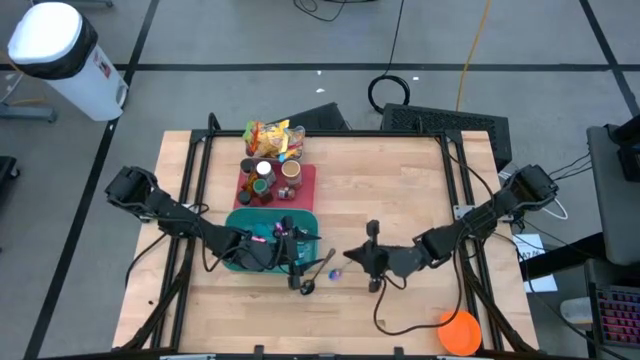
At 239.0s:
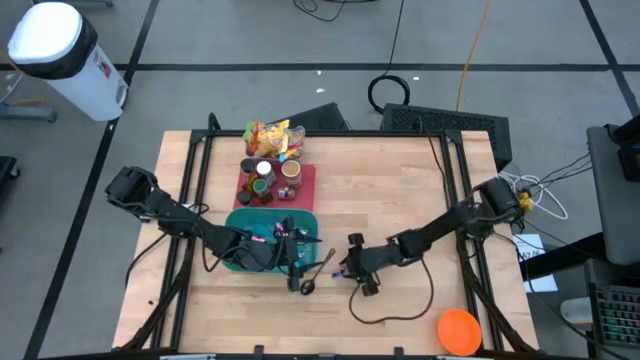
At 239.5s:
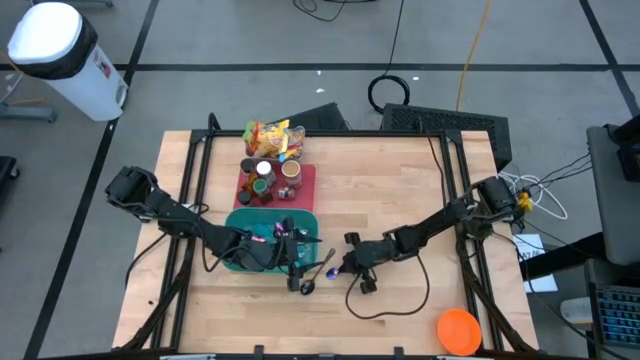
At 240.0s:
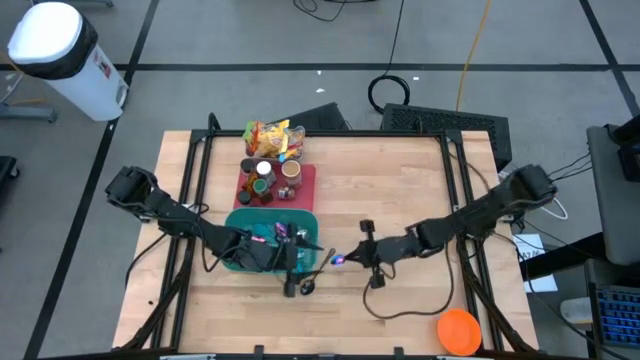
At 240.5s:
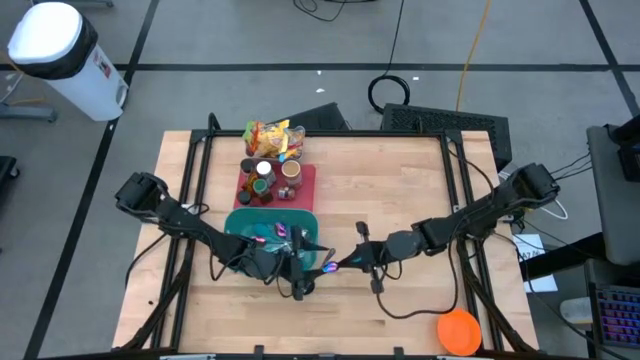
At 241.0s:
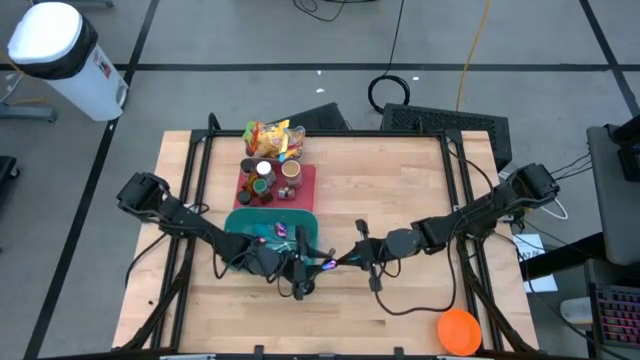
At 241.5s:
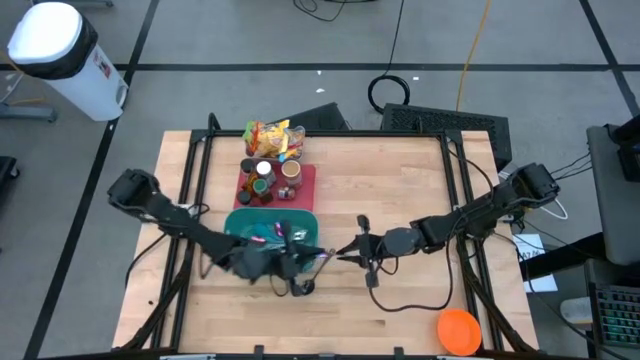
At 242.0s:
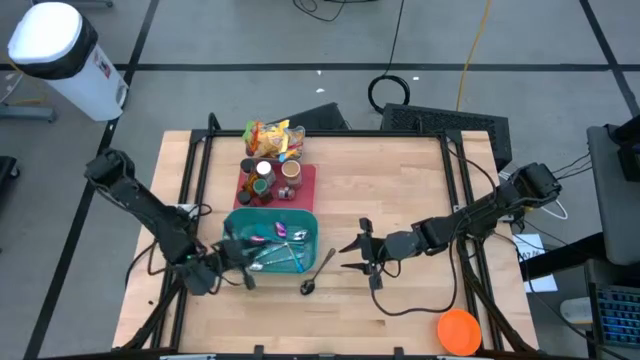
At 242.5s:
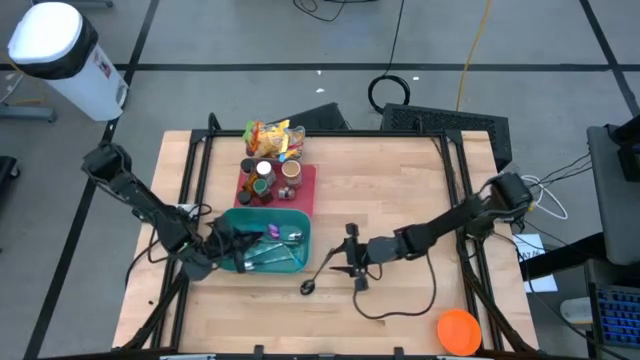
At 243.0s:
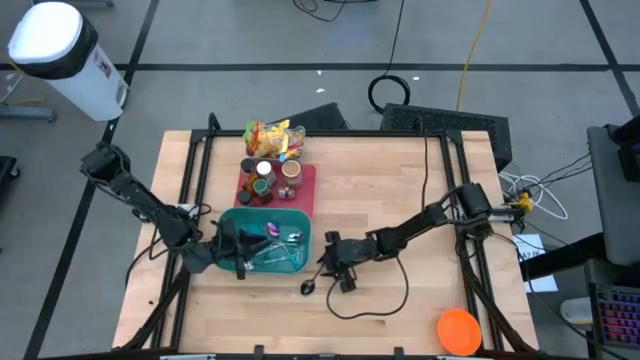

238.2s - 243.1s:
Task: Pick & Place Food Item
Put the violet spoon into the blue bin

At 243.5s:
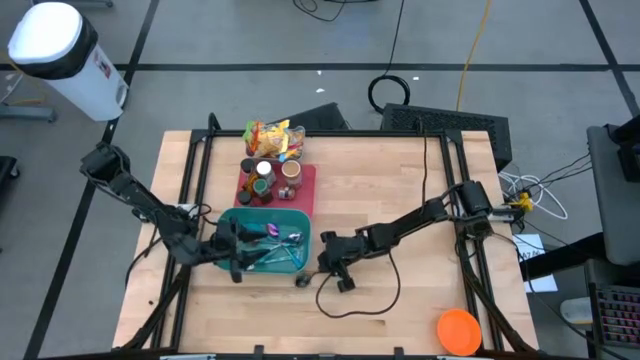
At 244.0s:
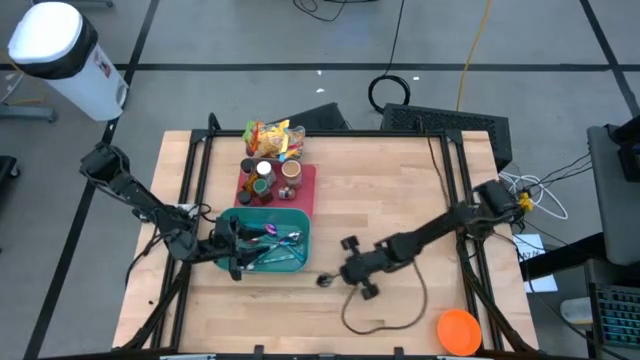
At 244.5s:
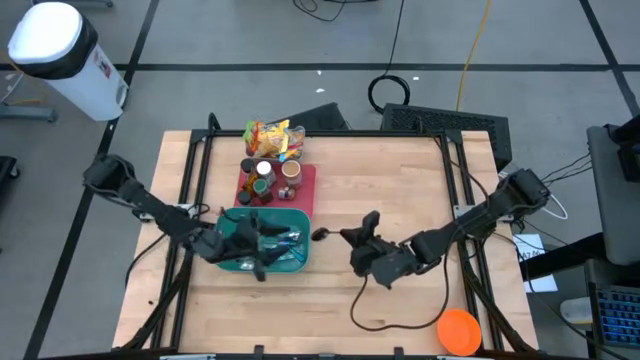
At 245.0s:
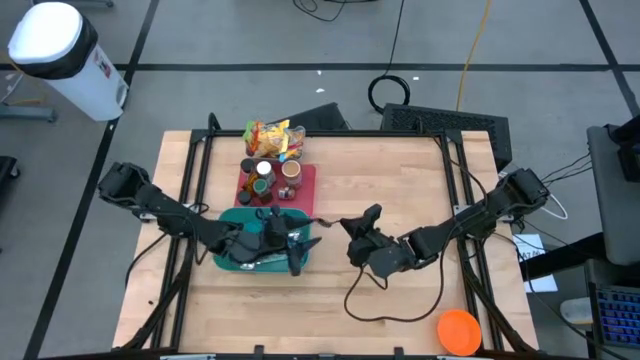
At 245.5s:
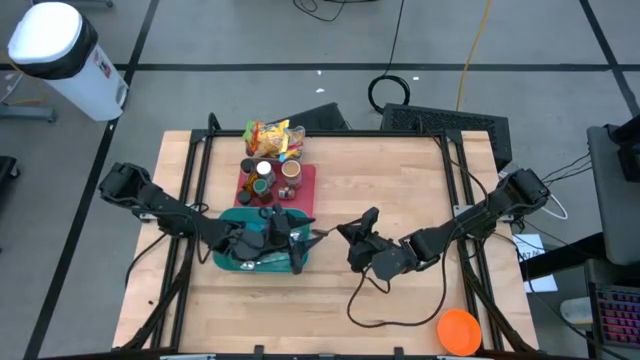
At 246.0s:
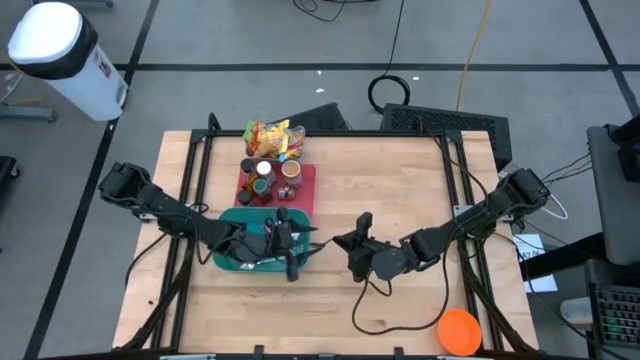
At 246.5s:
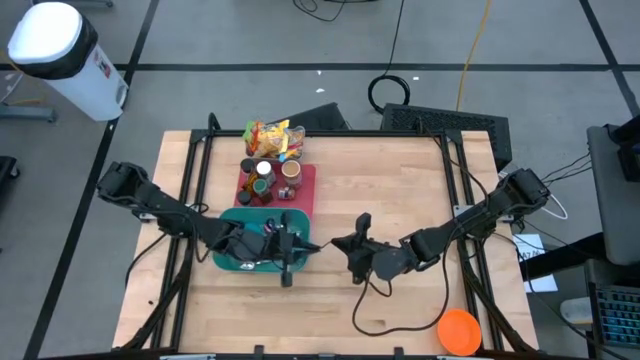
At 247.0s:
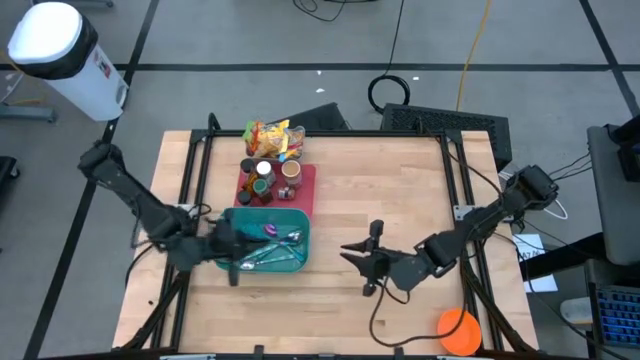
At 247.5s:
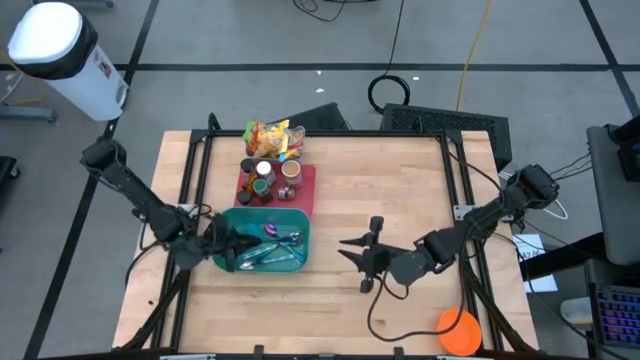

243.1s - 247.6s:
Put the black spoon into the blue bin

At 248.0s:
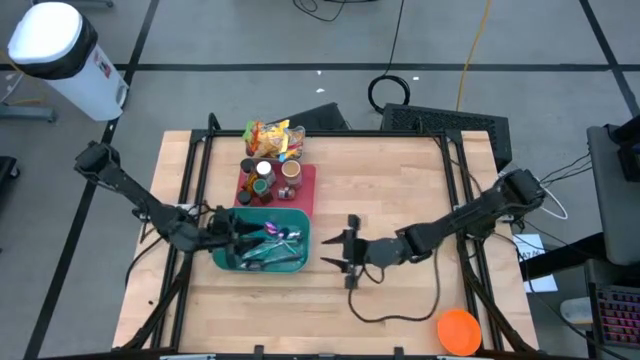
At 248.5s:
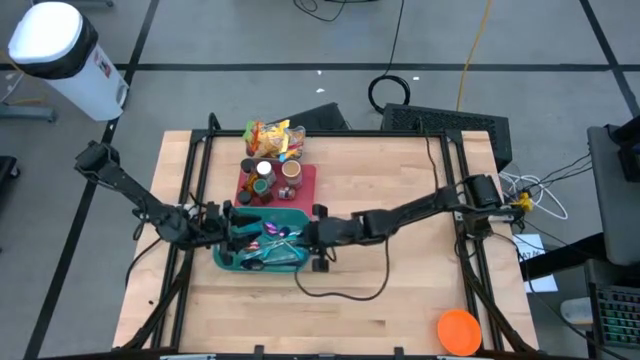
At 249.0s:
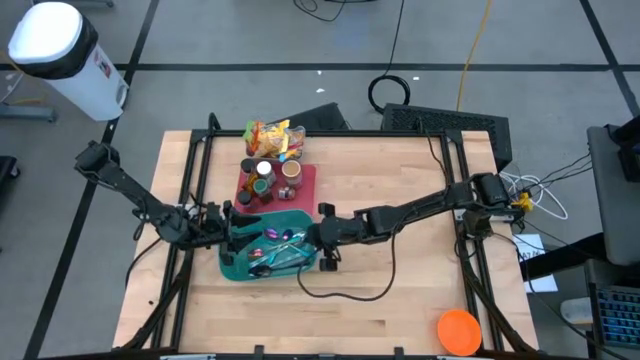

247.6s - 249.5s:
Adjust the blue bin on the table

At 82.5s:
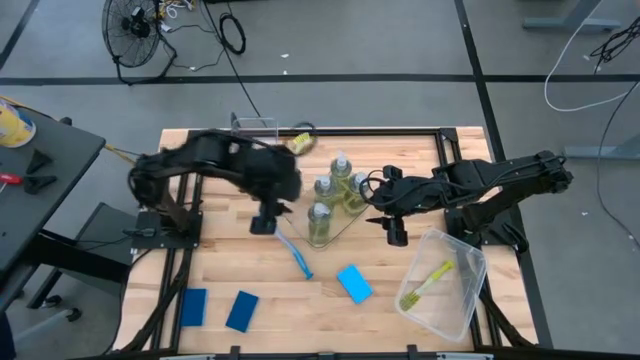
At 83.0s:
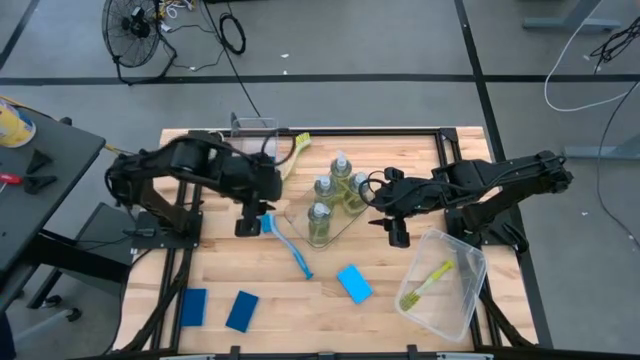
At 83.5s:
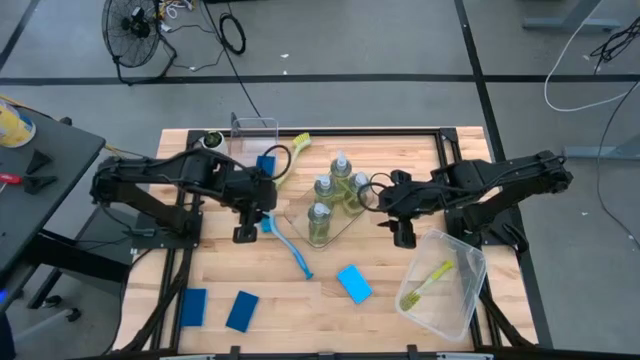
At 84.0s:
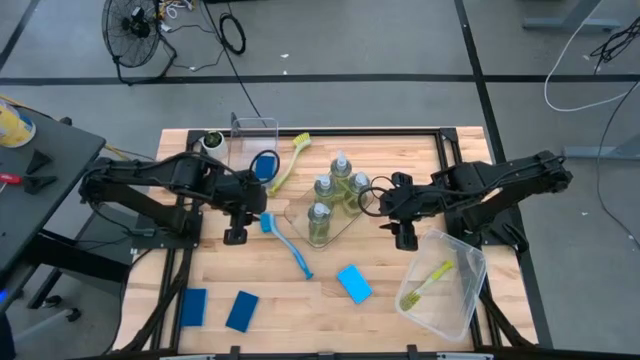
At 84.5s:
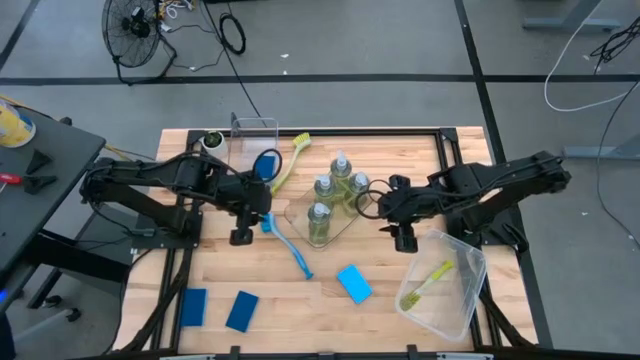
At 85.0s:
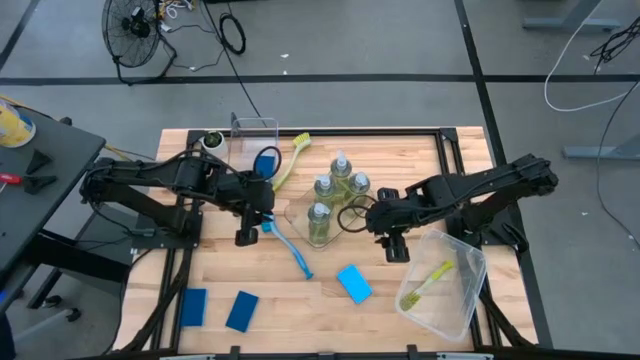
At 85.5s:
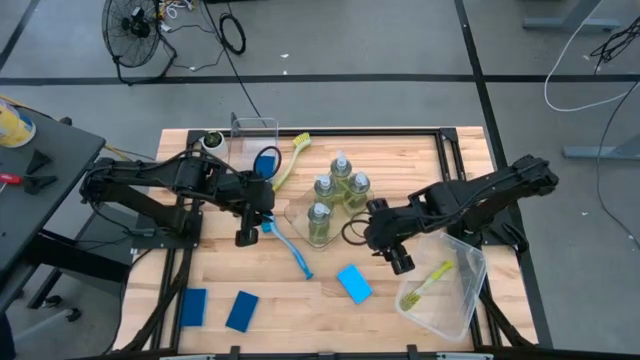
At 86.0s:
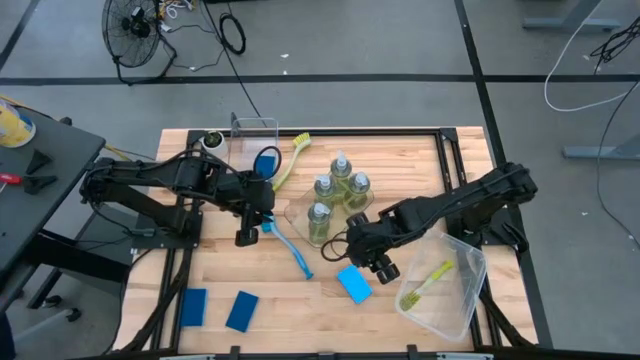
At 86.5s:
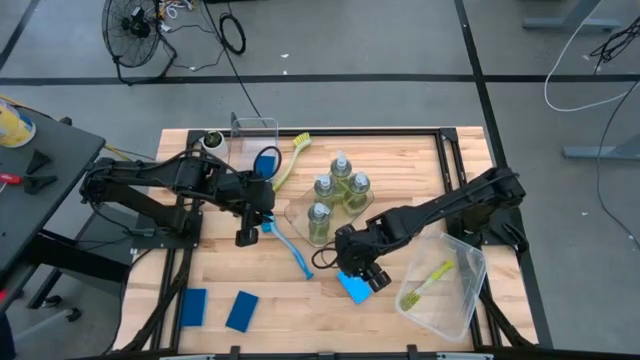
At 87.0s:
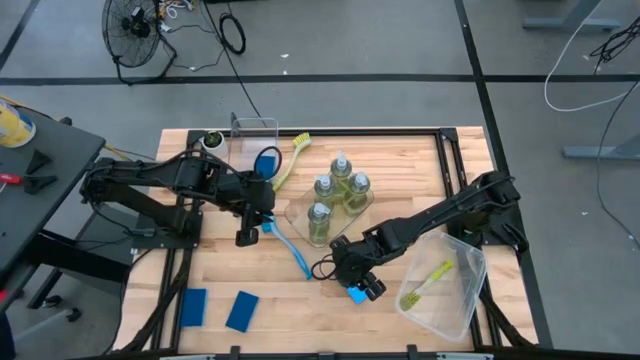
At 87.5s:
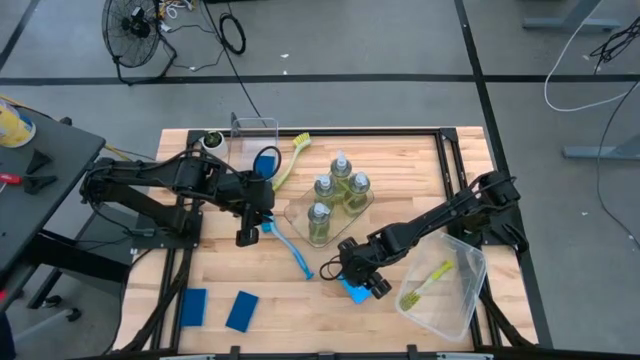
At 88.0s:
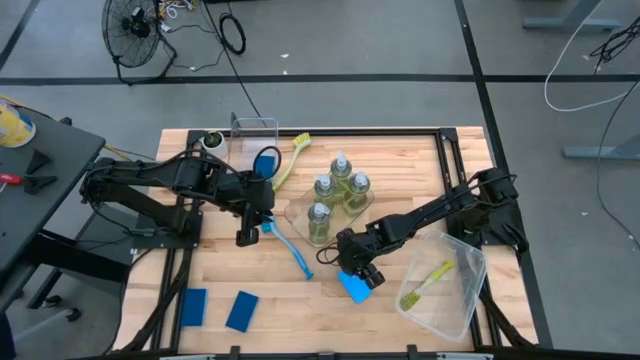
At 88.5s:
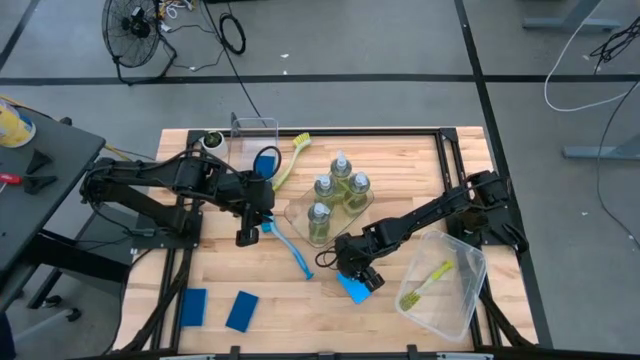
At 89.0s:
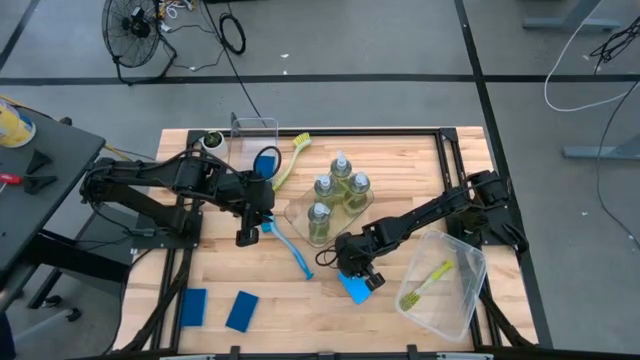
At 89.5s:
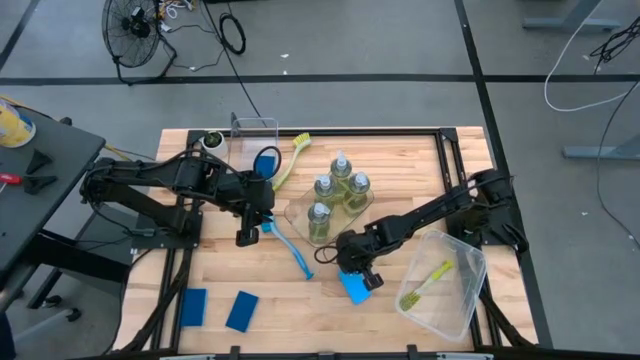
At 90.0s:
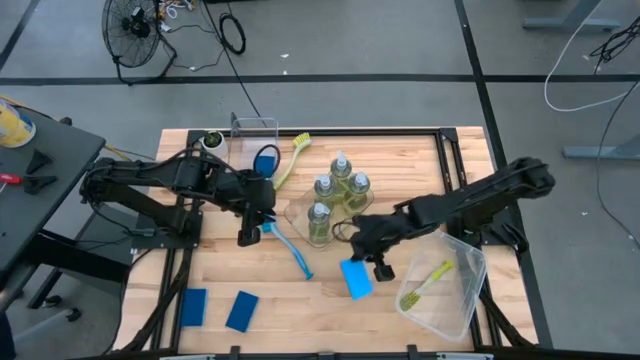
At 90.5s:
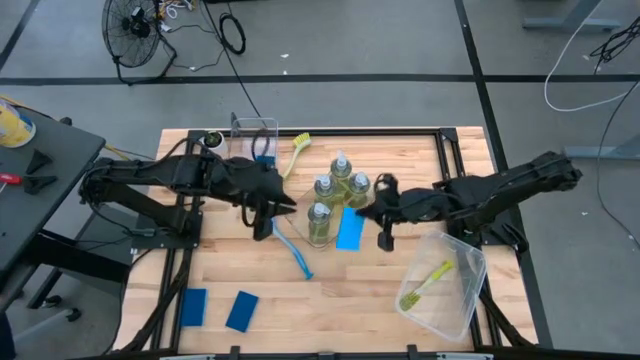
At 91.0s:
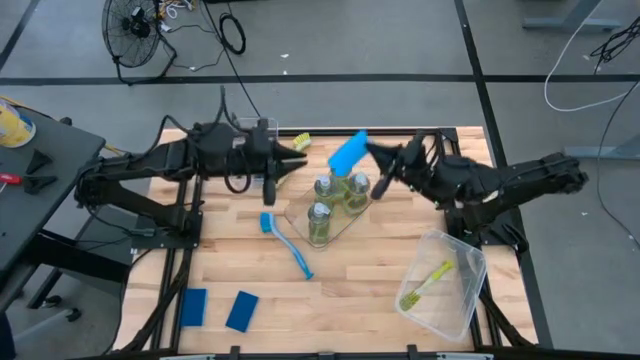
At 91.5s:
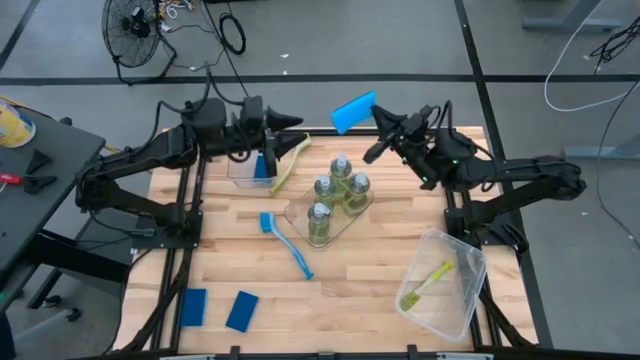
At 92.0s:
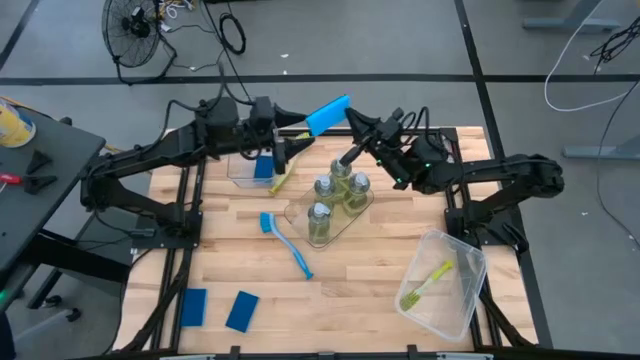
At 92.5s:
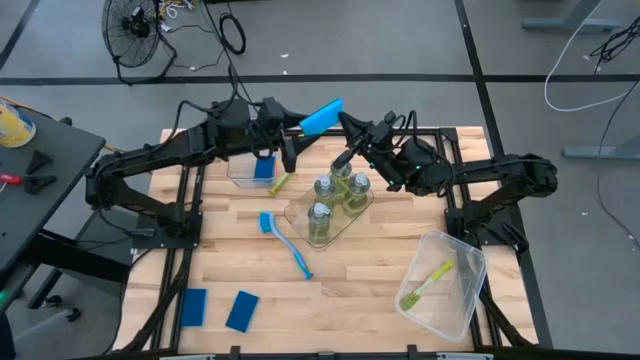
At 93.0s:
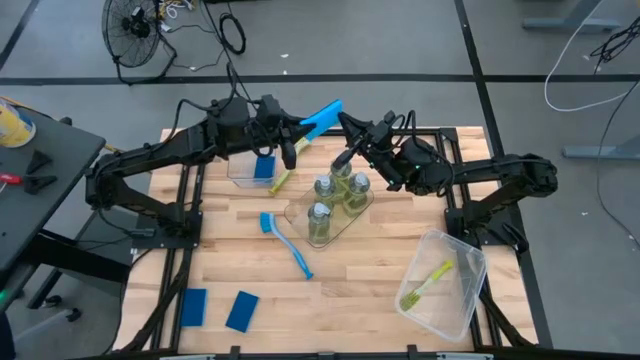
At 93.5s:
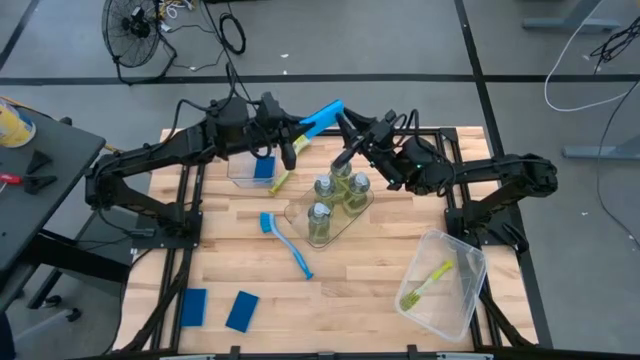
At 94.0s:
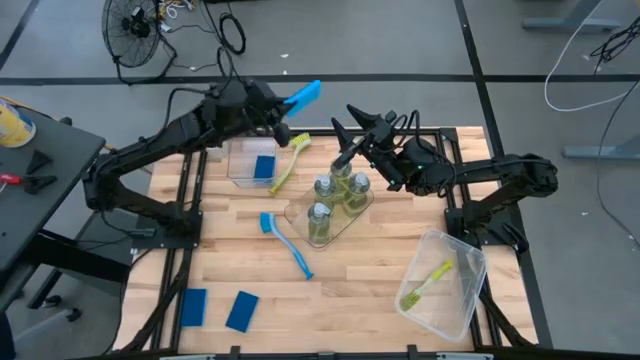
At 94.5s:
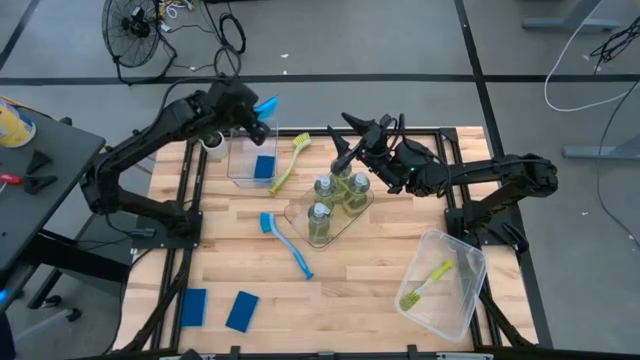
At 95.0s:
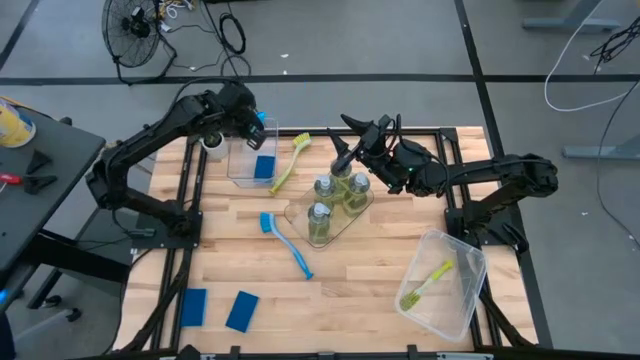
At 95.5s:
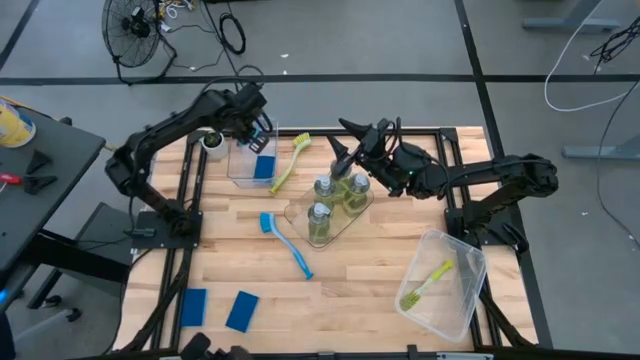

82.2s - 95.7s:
Task: Pick & Place Kitchen Sink Supplies
Put the blue sponge into the top transparent bin
